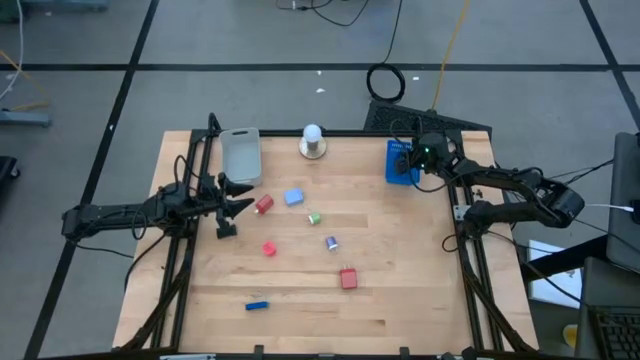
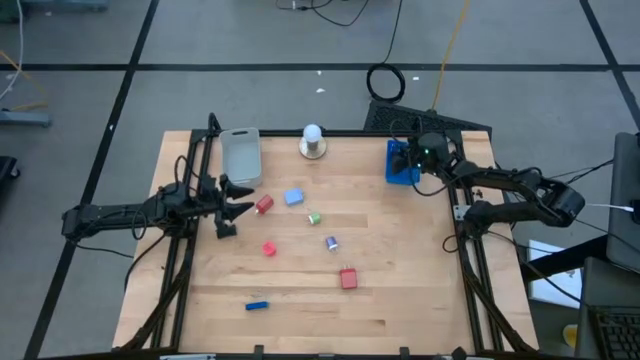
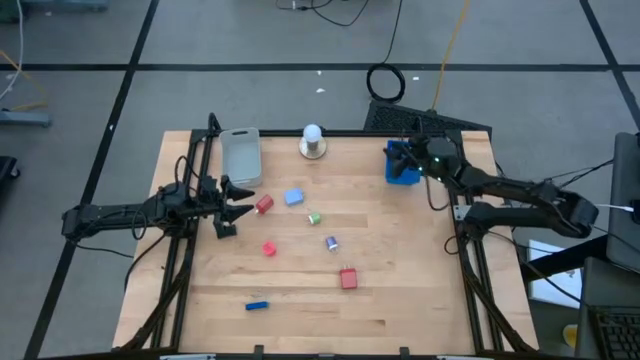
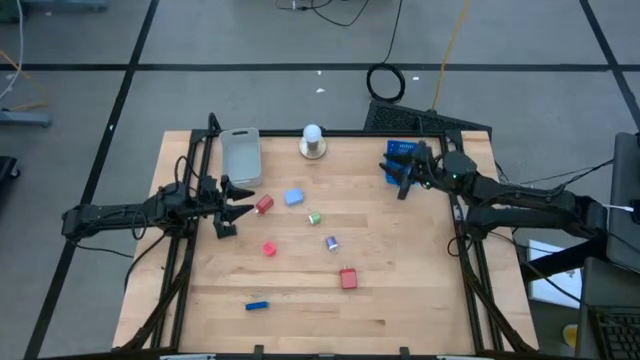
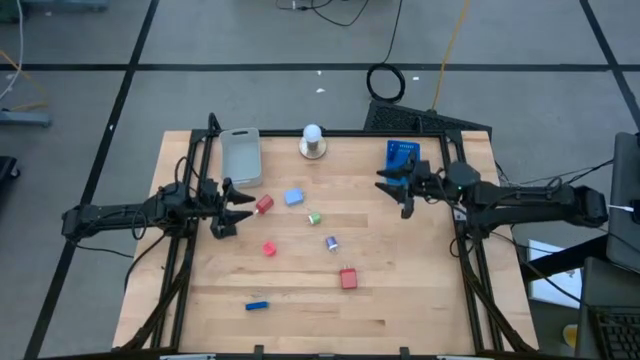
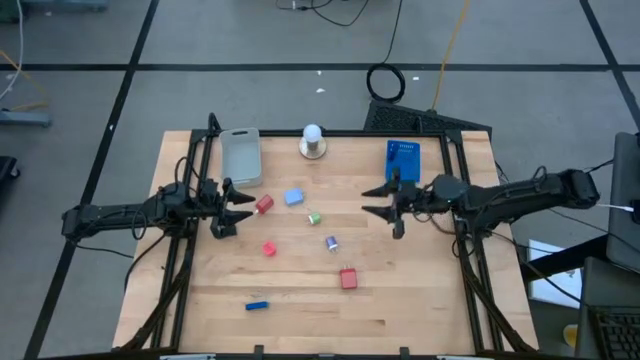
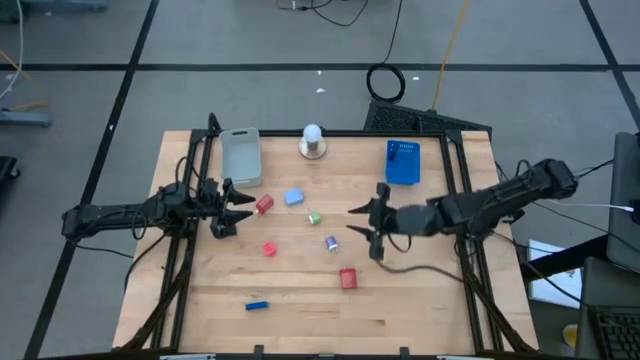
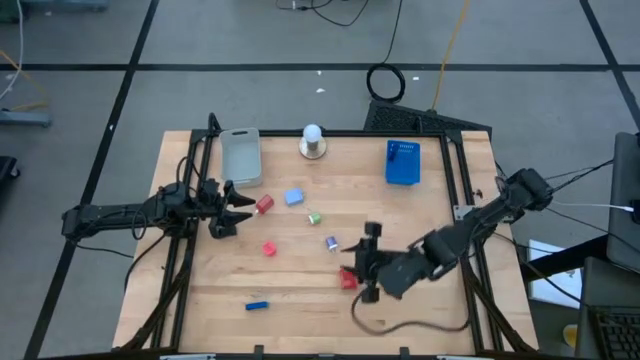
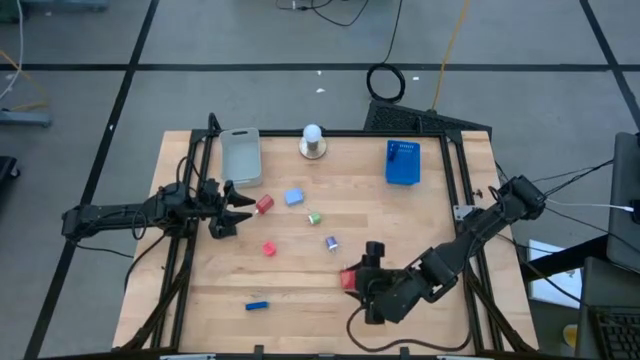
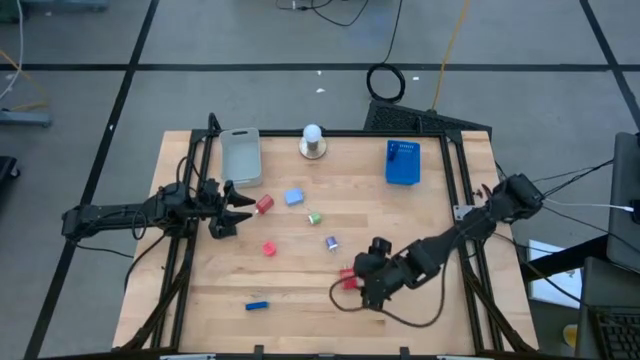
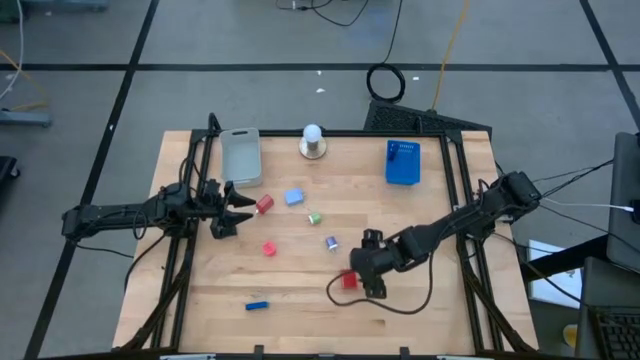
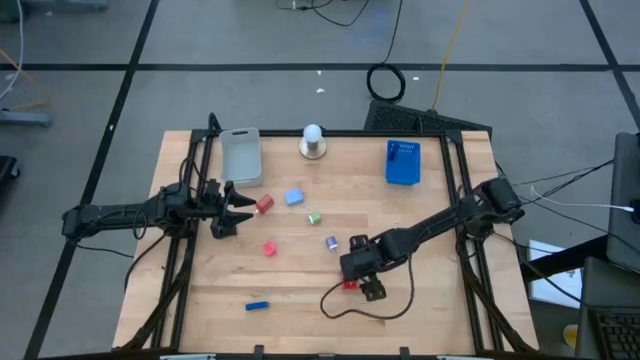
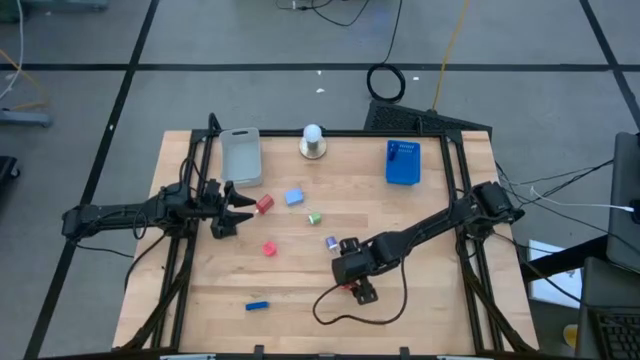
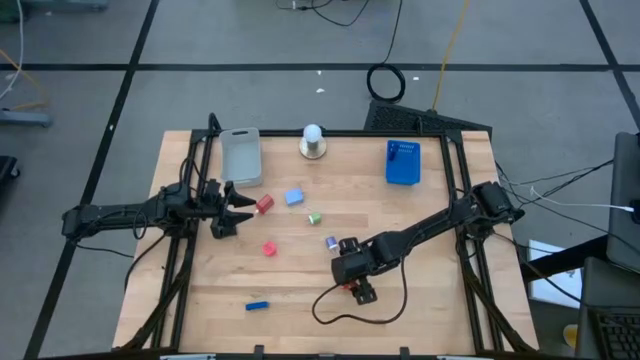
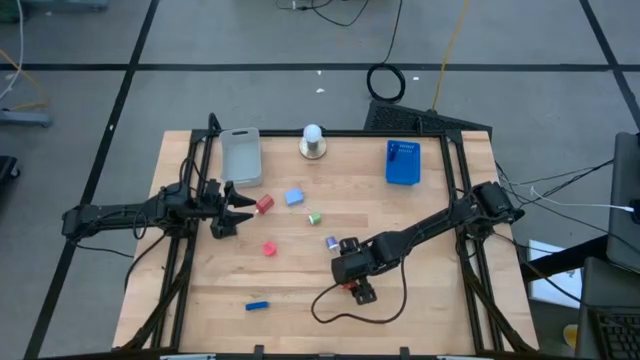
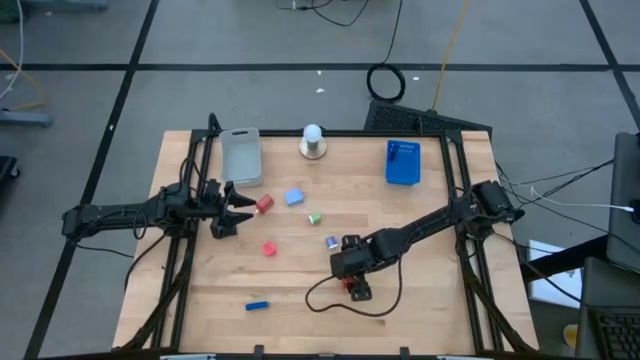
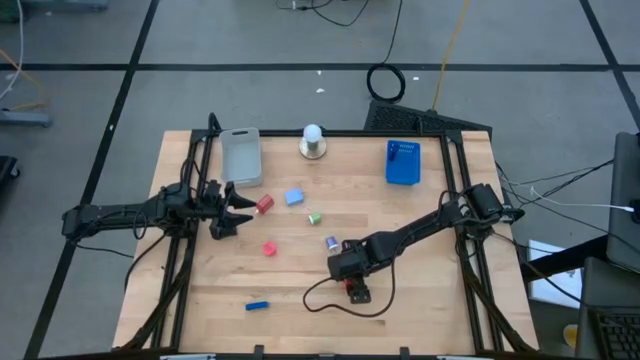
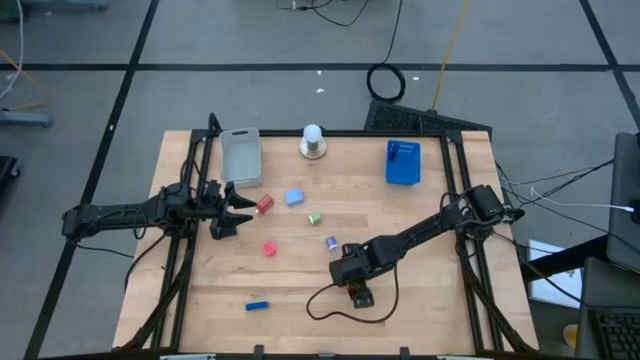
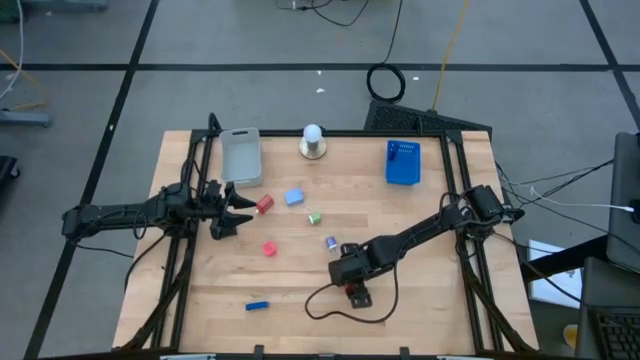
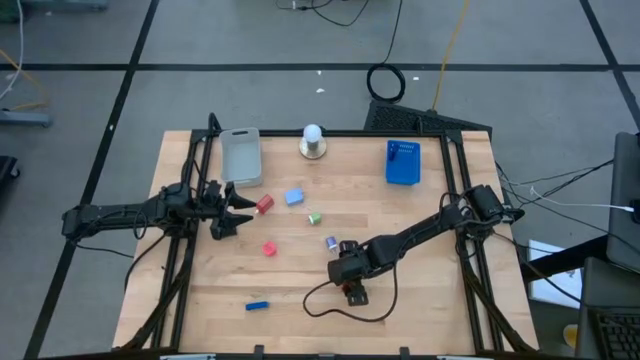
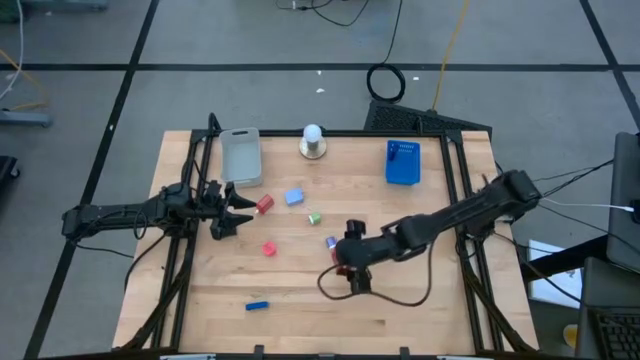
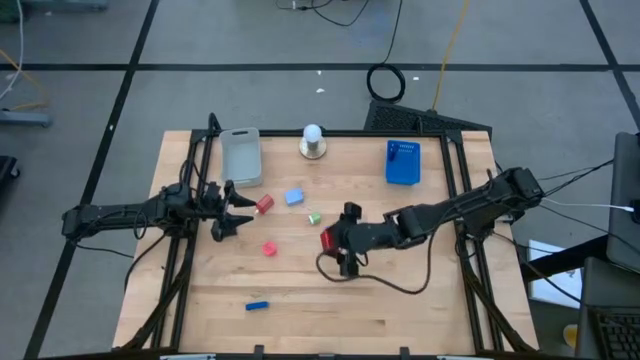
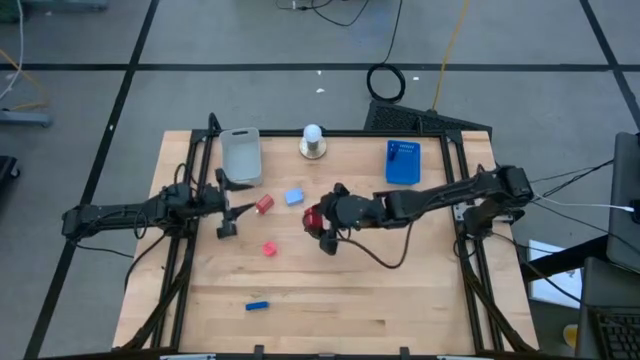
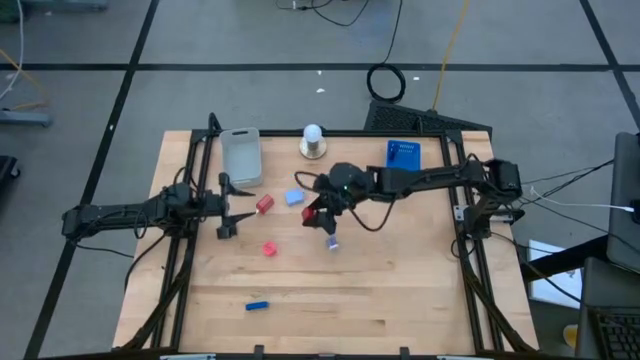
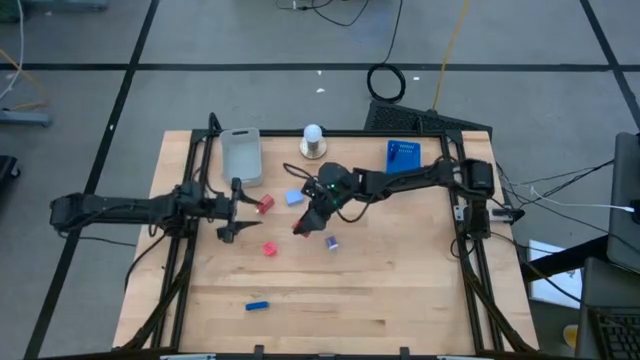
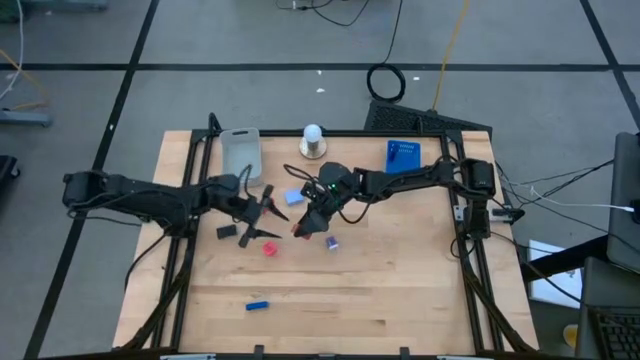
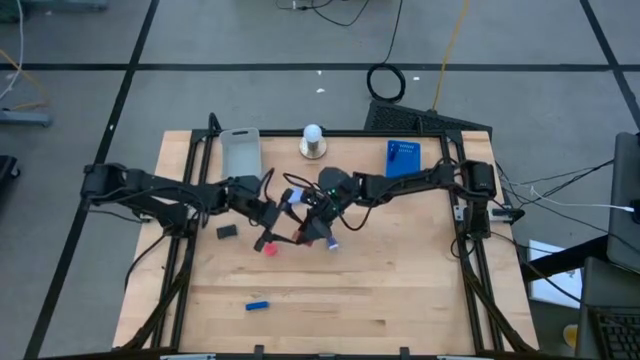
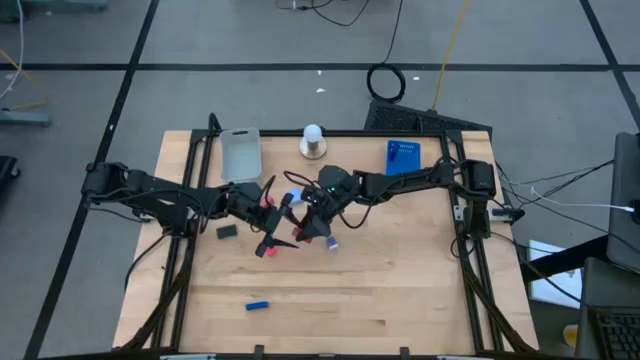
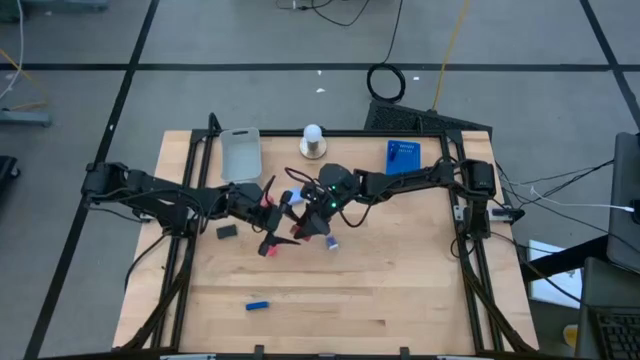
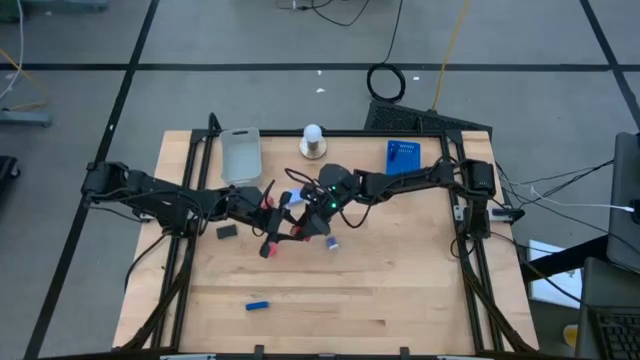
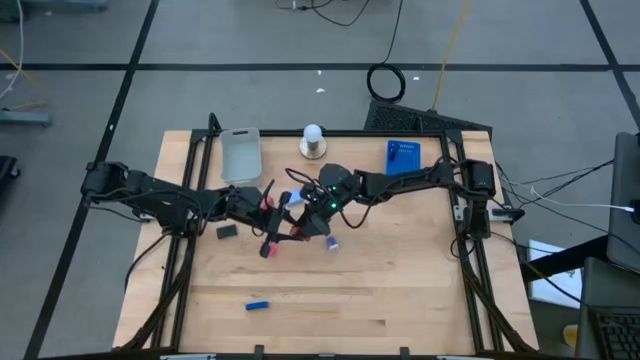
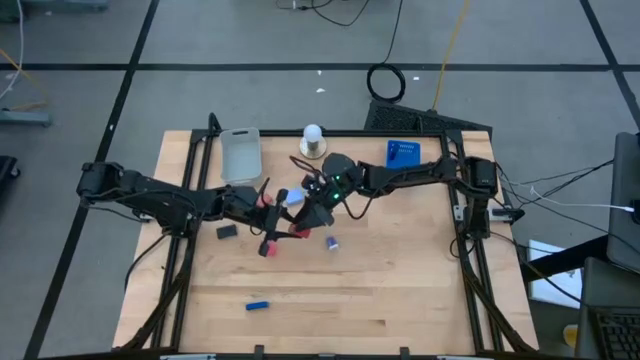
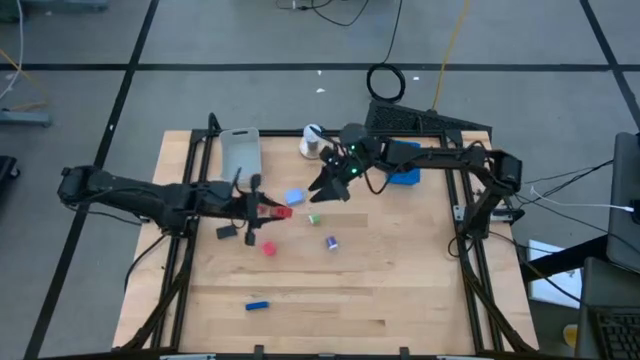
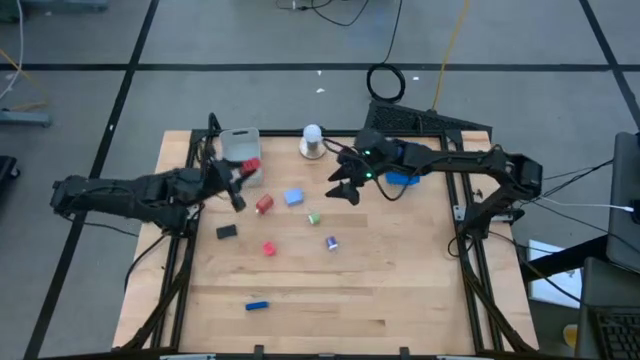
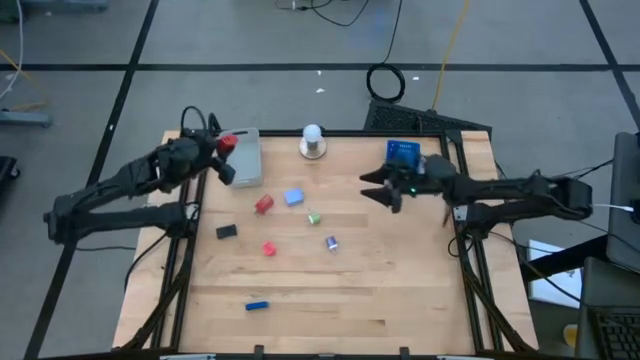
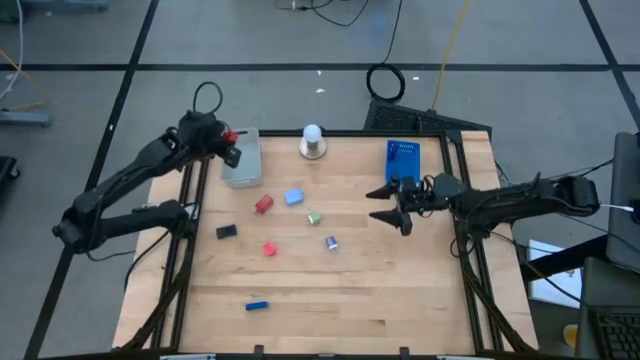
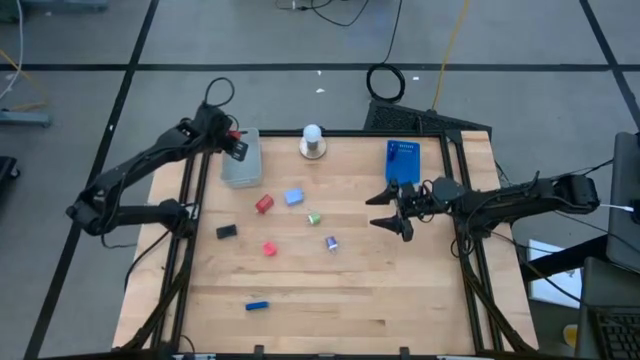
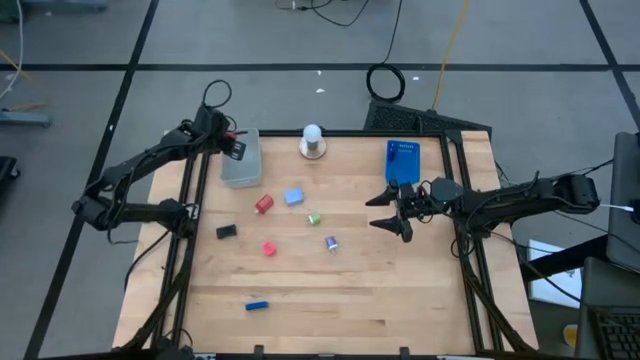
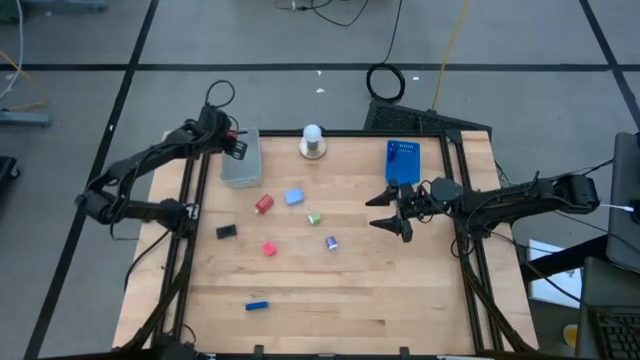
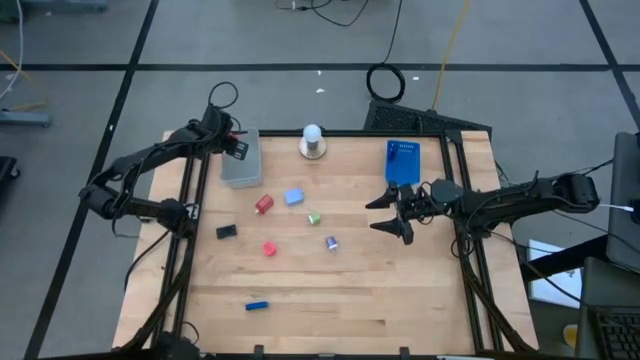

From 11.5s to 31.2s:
Task: Pick & Place Office items
Put the bottom red charger adapter into the gray bin
